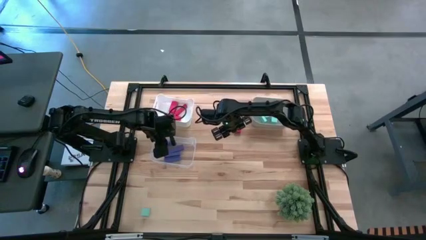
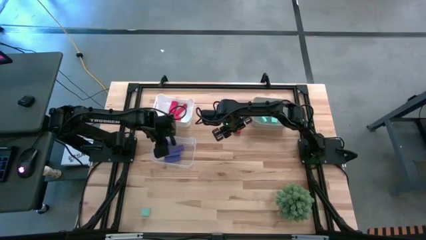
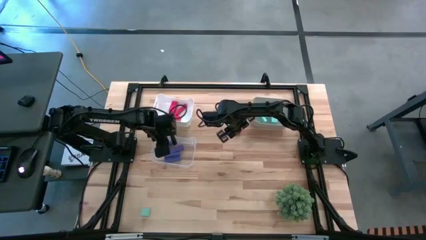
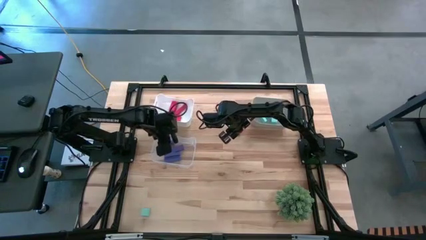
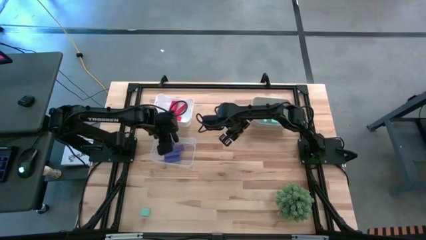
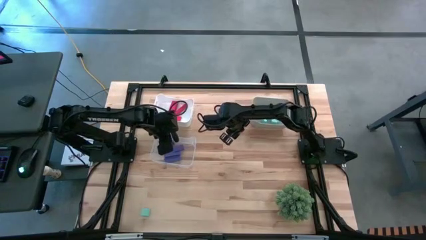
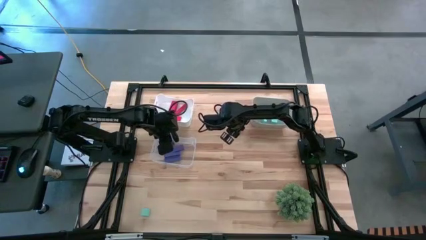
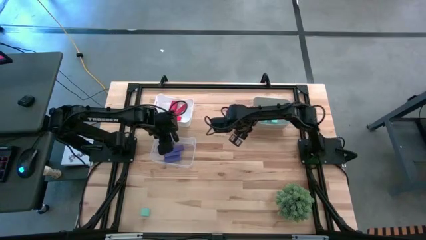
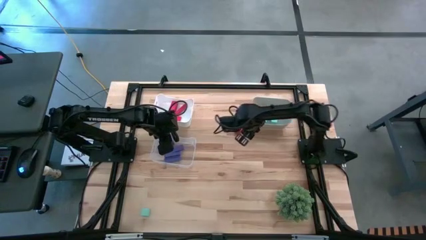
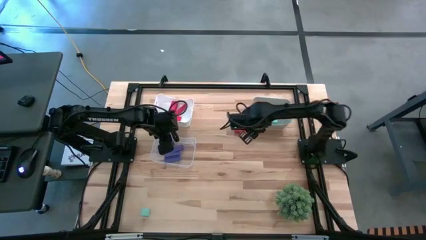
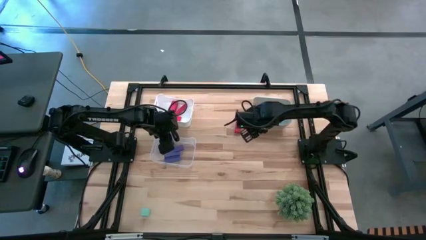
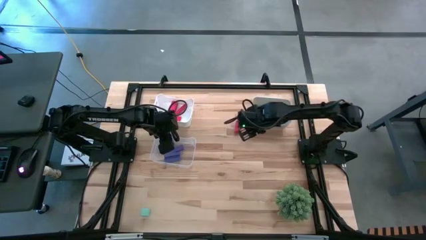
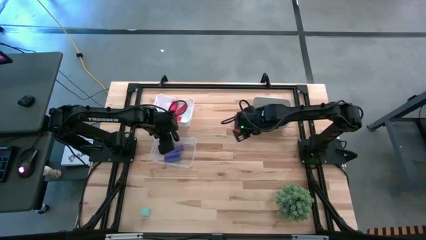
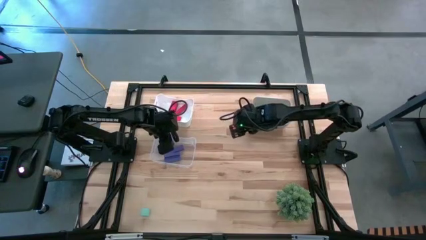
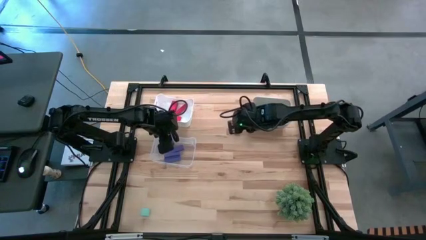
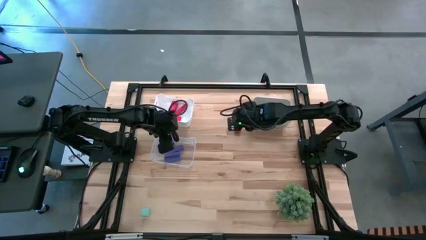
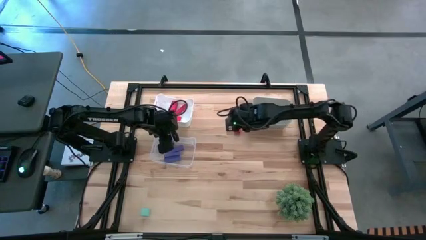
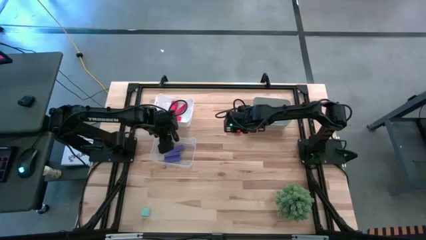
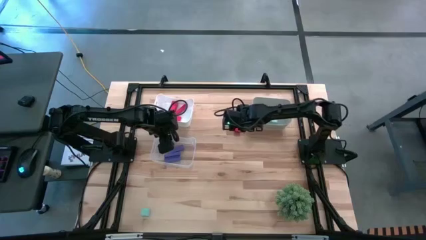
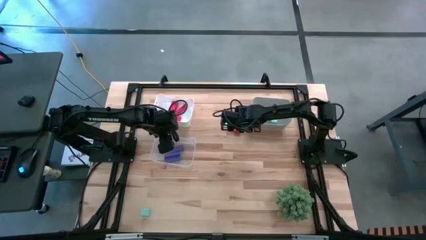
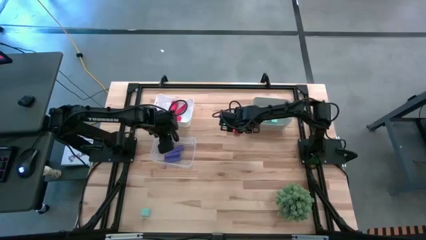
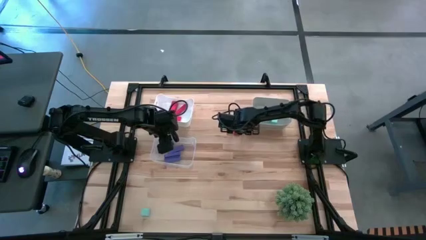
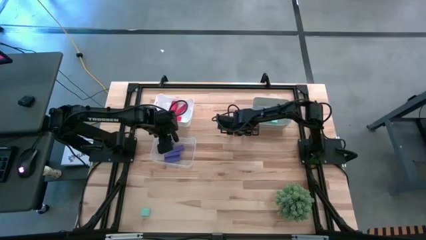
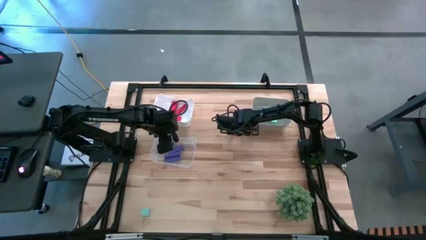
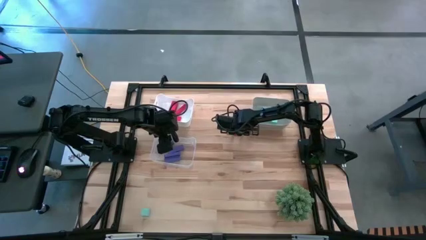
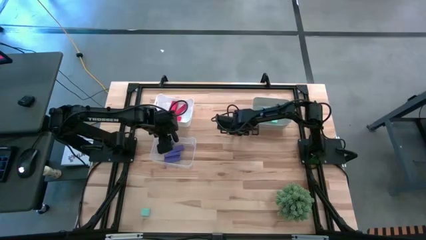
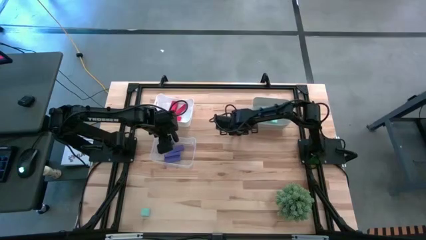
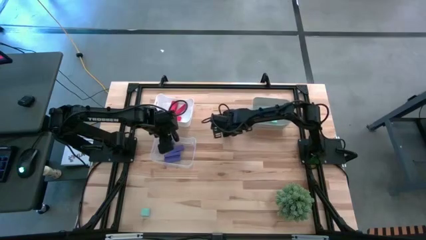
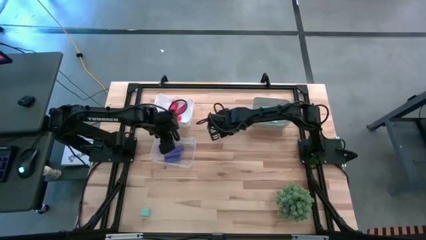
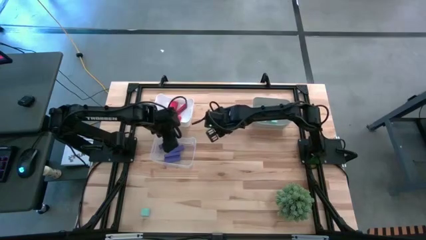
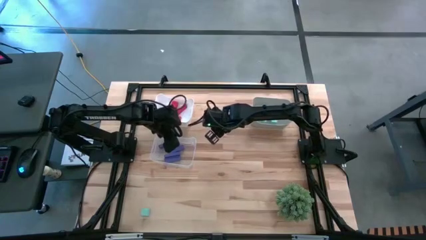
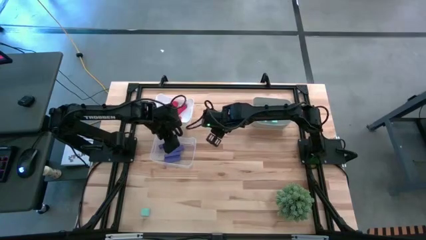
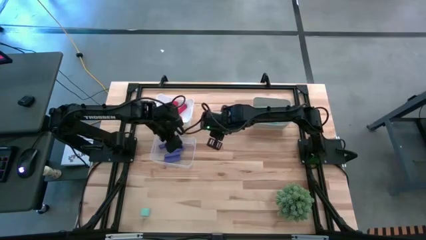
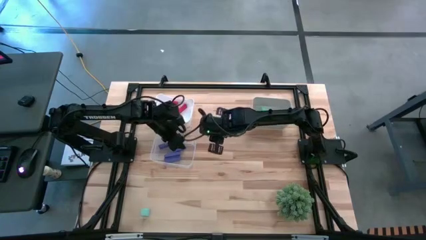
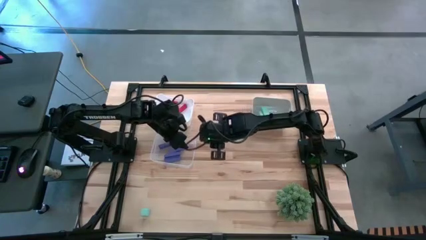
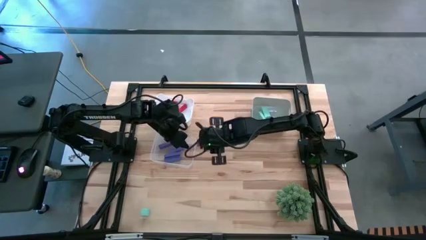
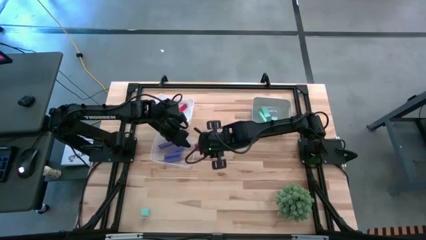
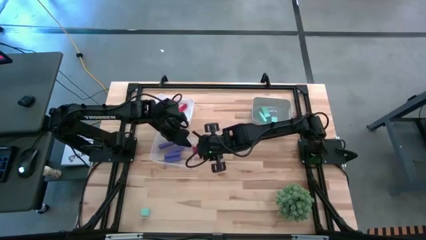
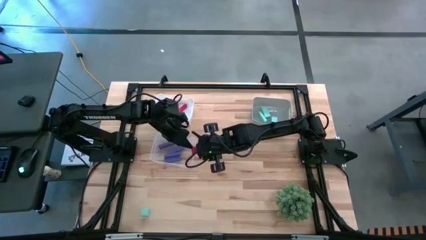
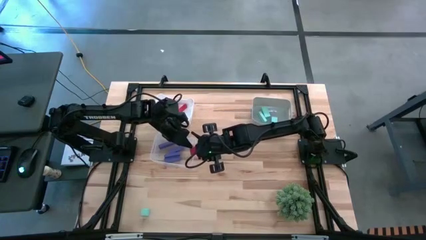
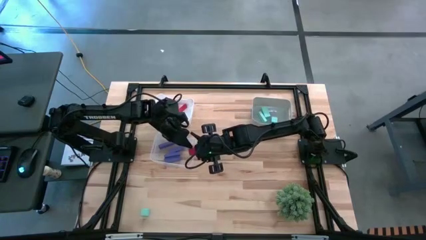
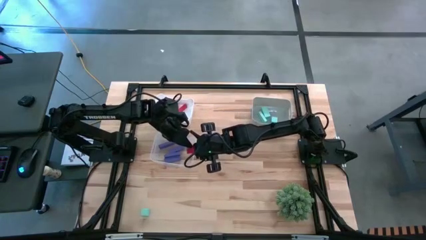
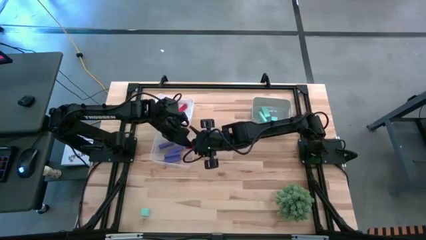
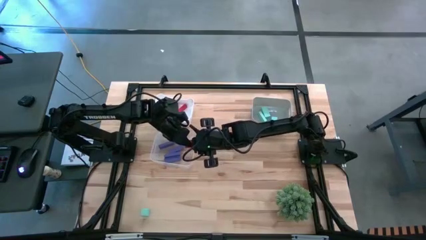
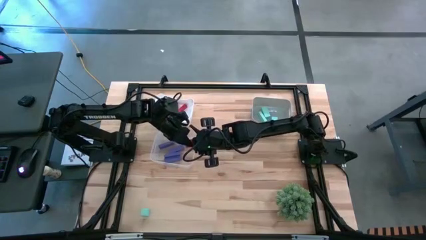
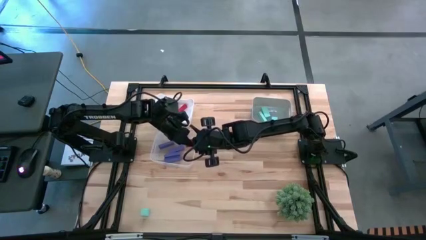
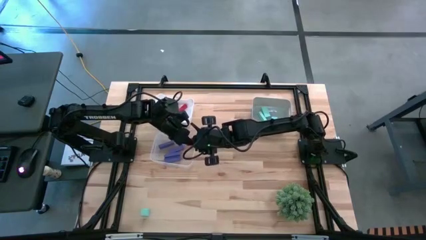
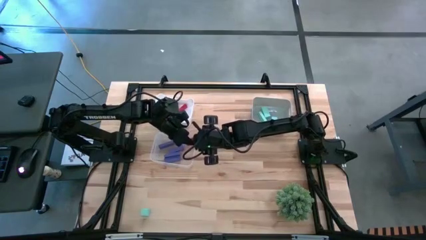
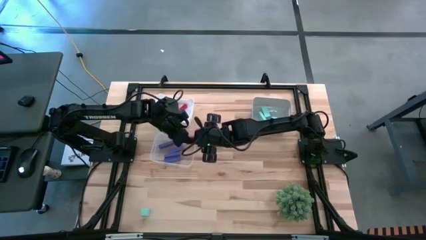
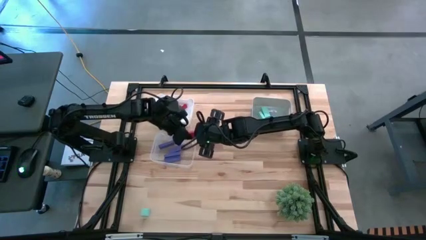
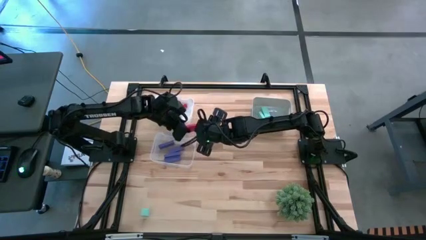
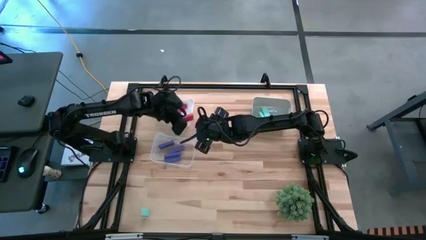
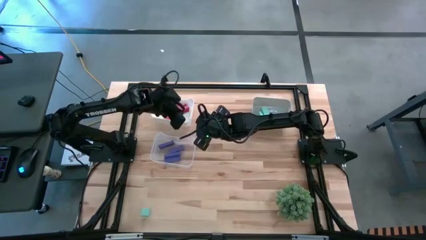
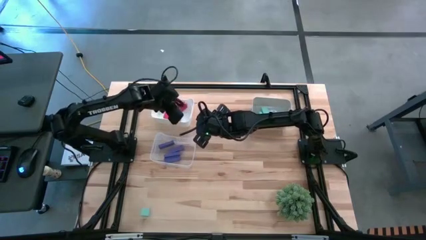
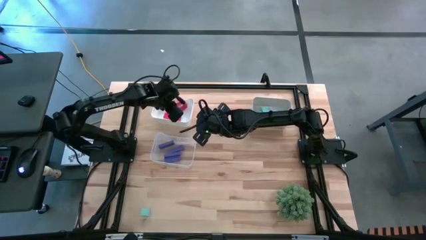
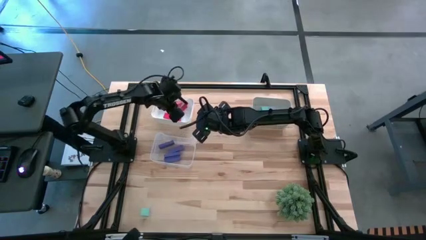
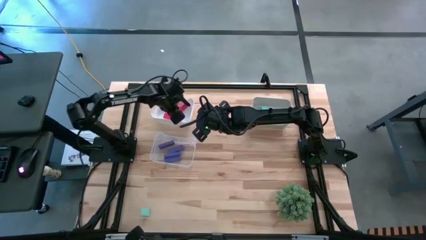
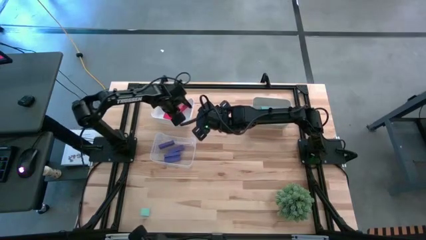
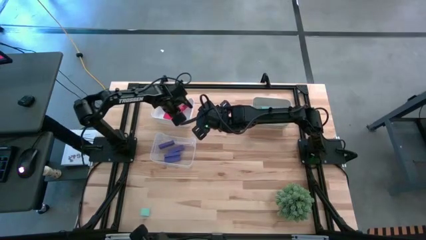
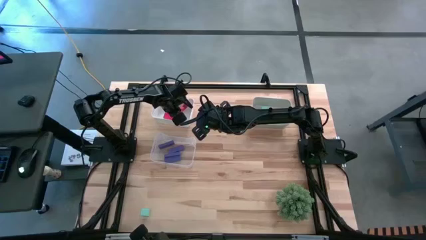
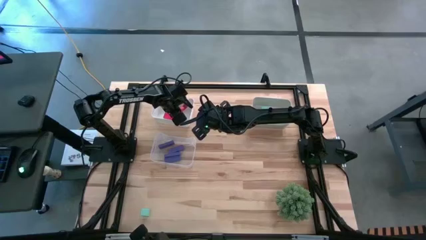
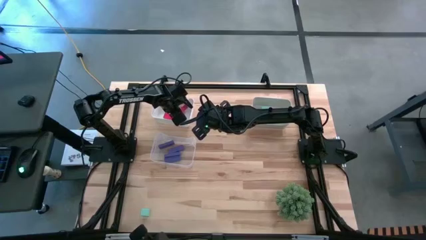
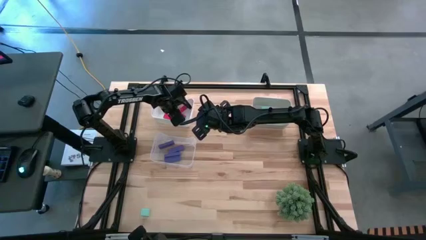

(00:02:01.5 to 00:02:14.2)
Task: Sort & place blocks by color
Put the red block into the white bin
